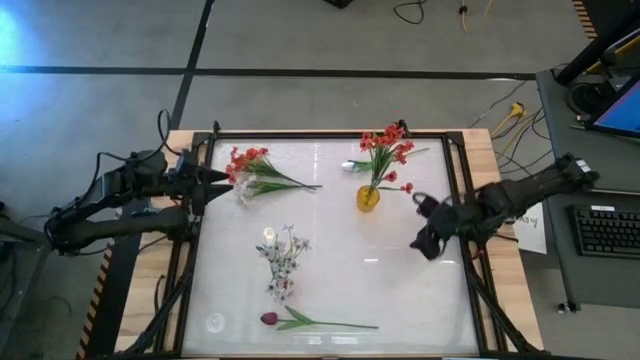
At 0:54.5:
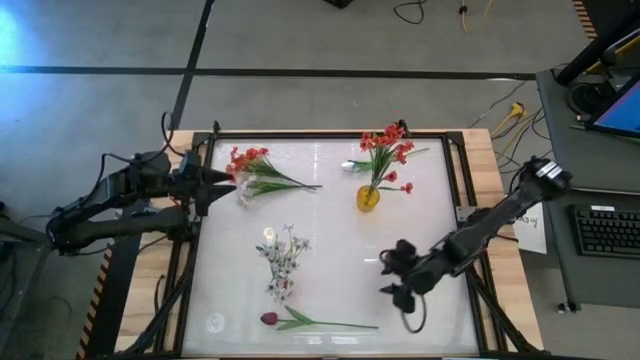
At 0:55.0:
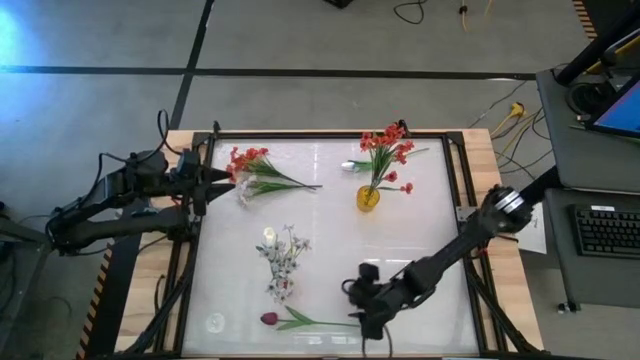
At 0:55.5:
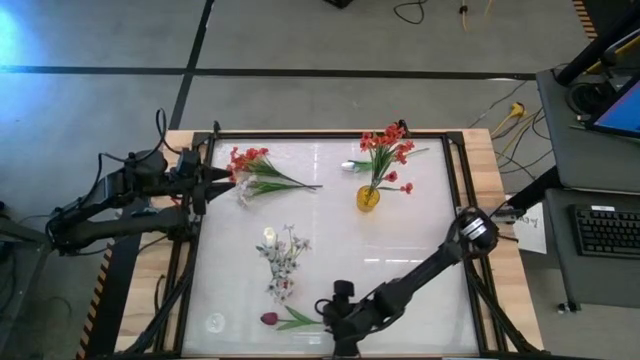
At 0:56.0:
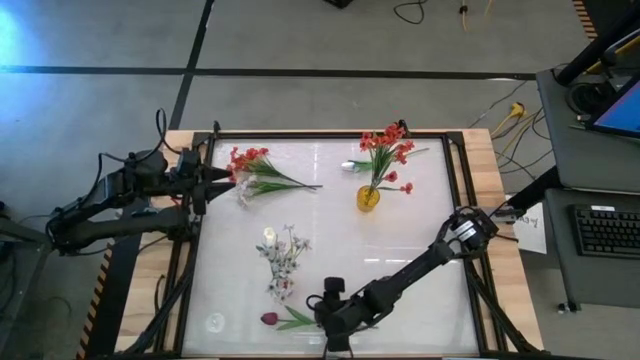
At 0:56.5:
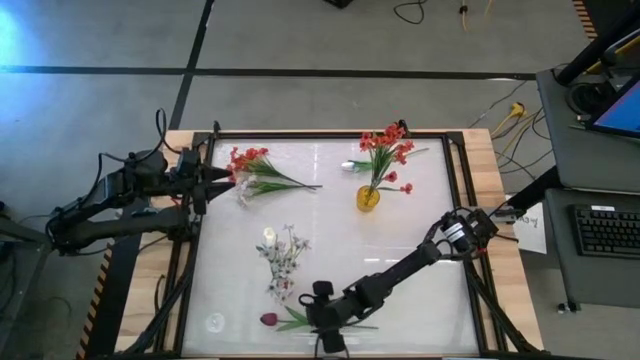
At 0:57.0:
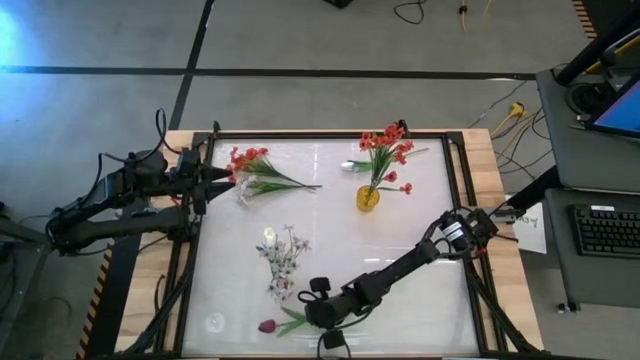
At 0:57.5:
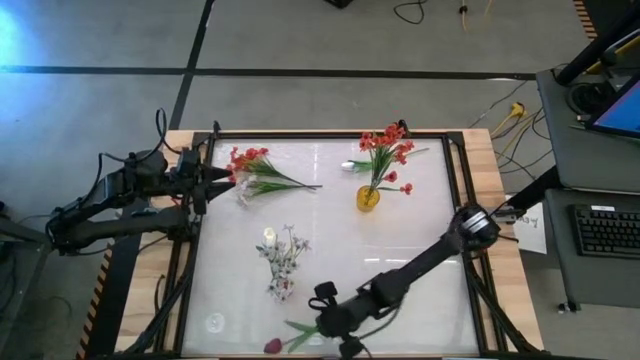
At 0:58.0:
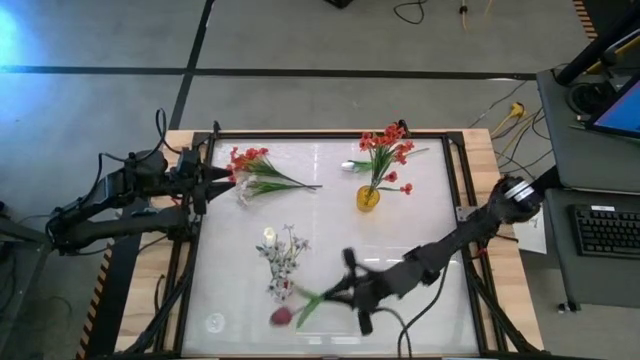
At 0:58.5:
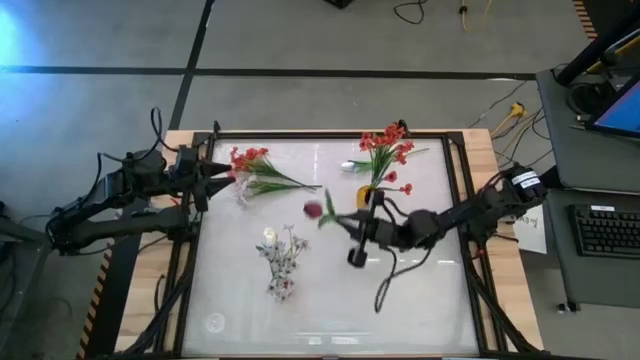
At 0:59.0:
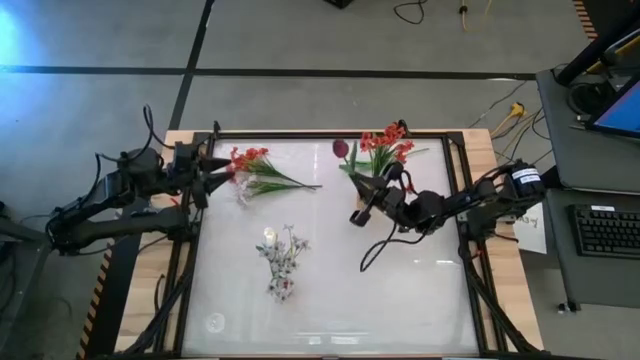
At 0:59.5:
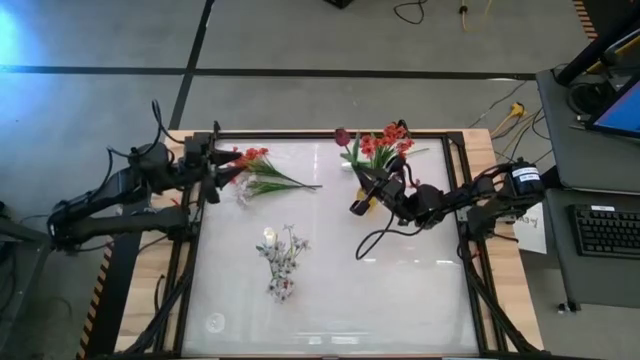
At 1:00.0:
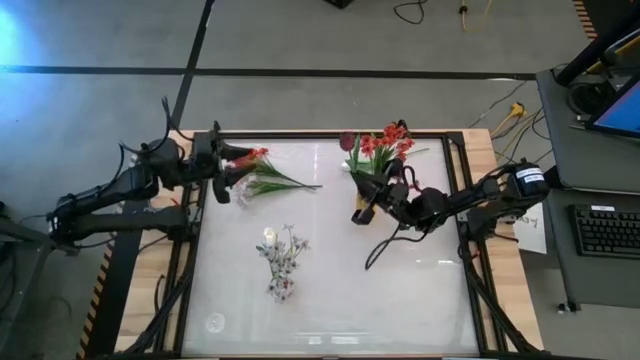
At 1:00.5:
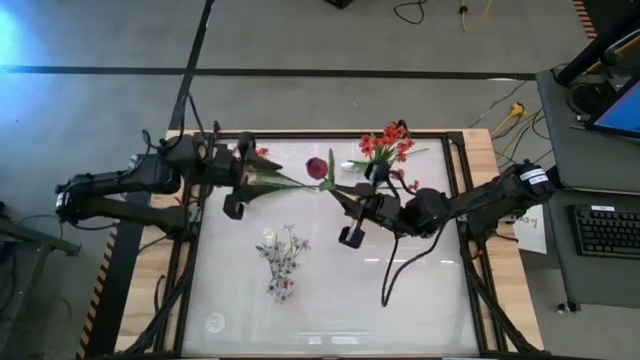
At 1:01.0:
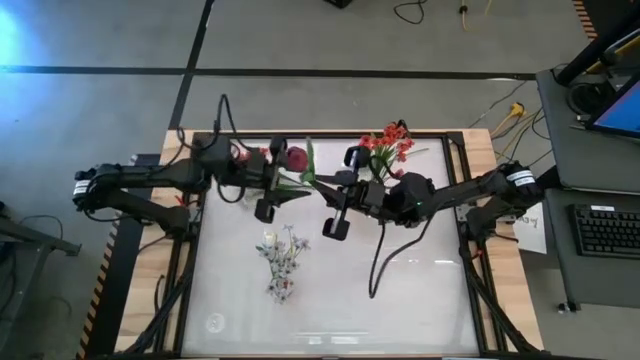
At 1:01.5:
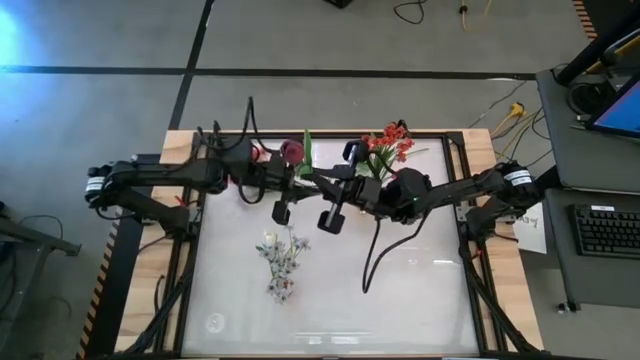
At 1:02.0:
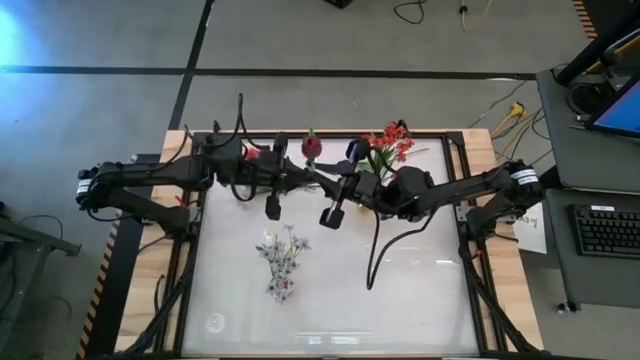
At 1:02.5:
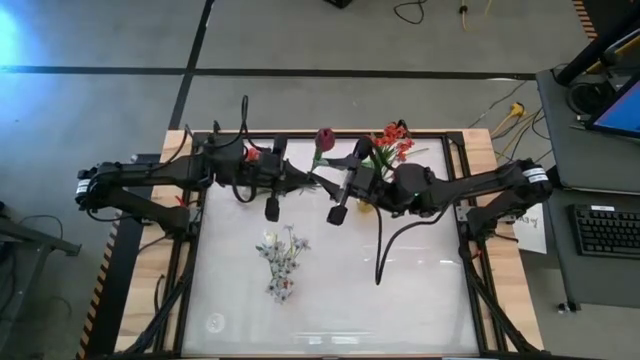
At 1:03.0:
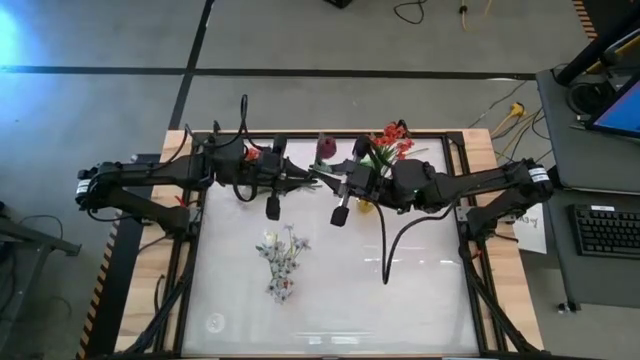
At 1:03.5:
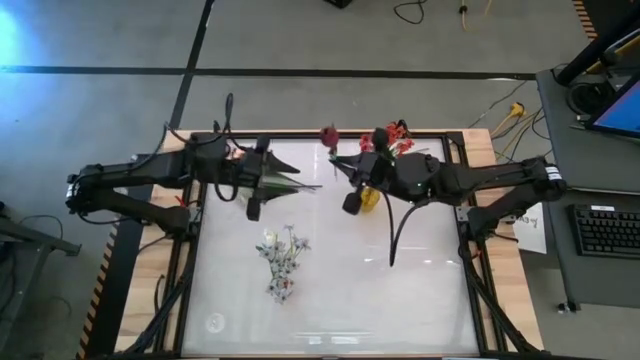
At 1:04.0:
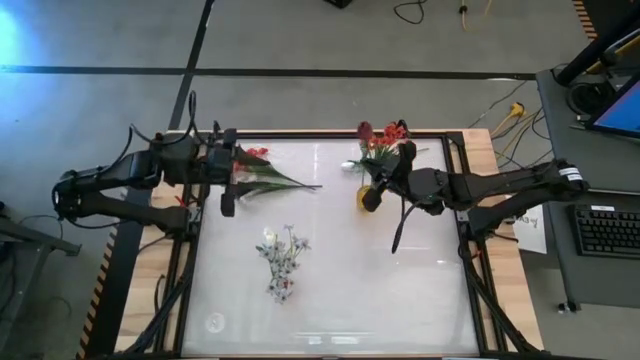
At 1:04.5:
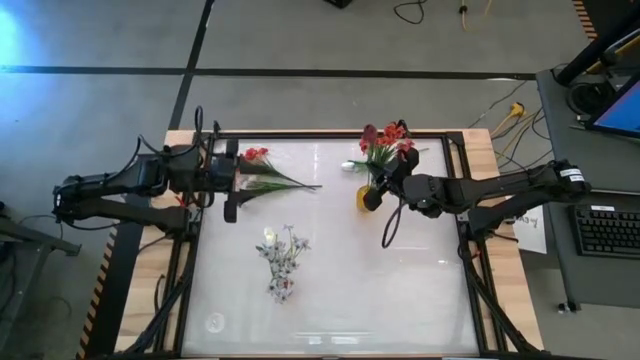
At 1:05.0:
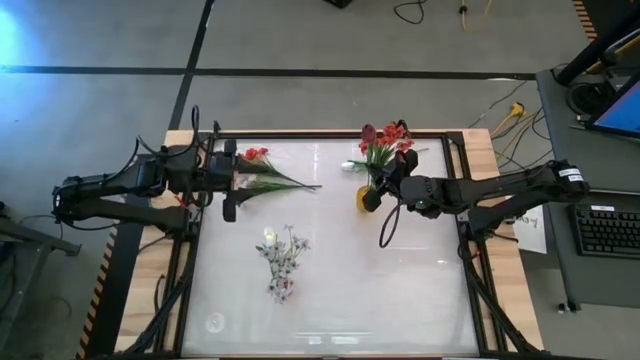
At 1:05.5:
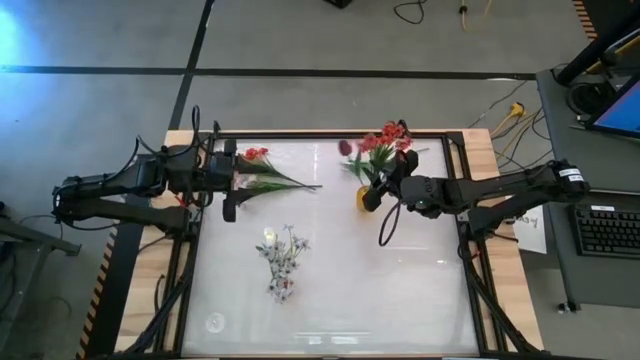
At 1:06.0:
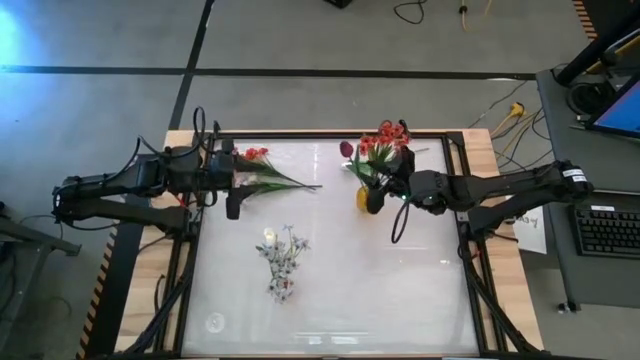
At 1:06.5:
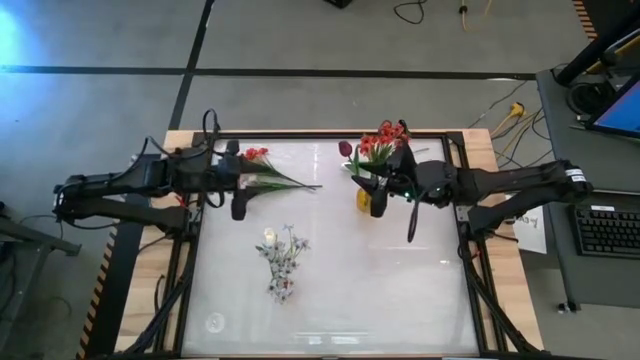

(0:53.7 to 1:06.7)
Task: Sort flowers into vase by color
Put the red flower into the yellow vase

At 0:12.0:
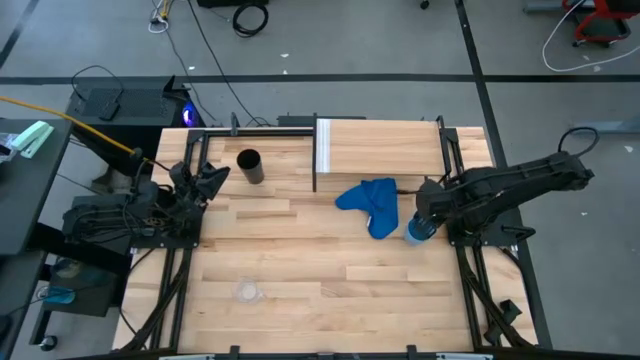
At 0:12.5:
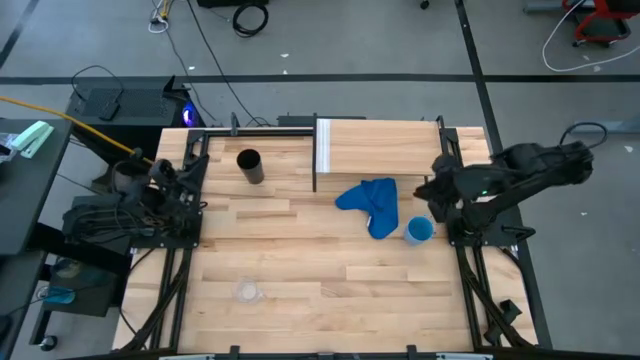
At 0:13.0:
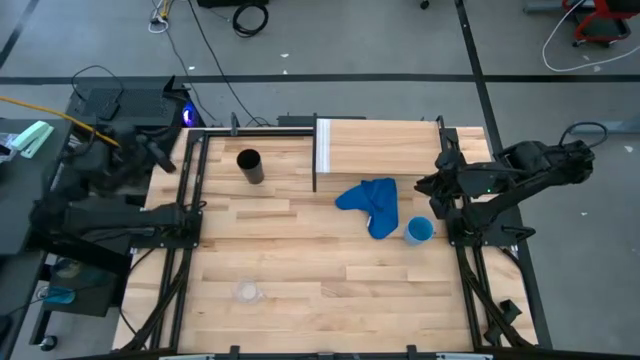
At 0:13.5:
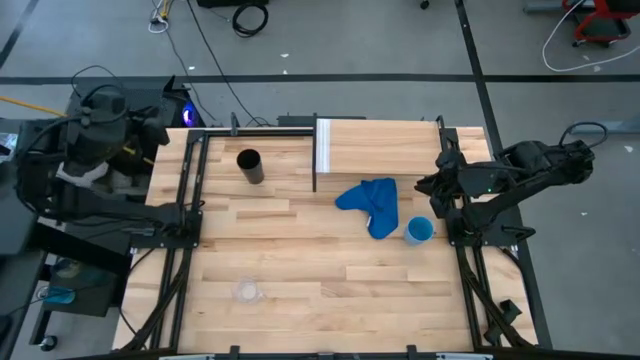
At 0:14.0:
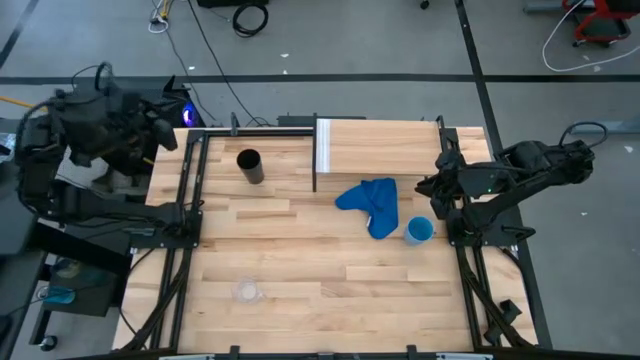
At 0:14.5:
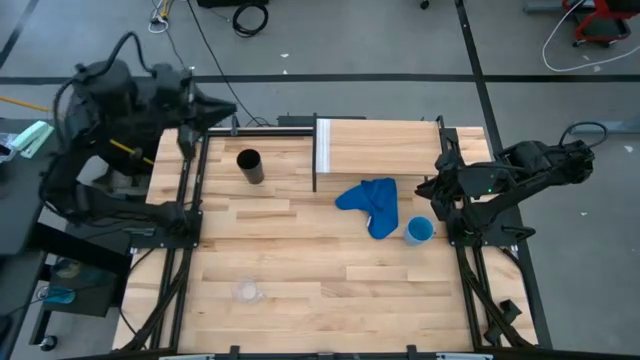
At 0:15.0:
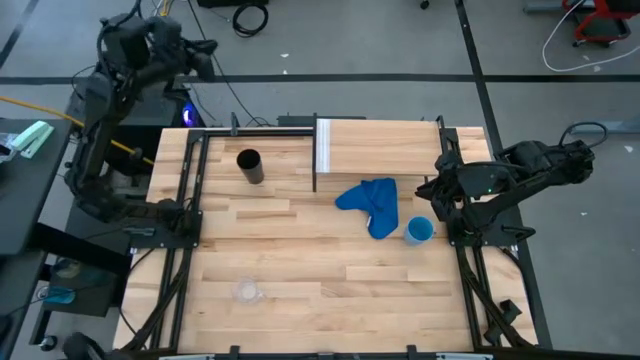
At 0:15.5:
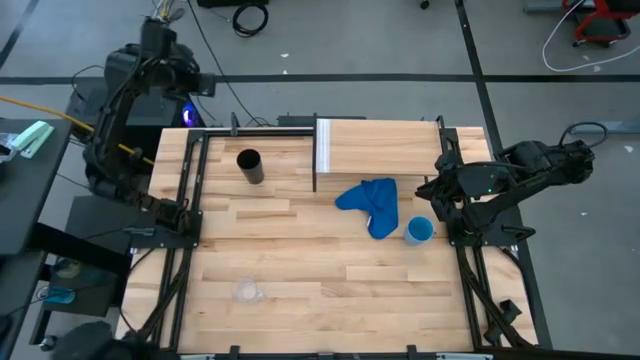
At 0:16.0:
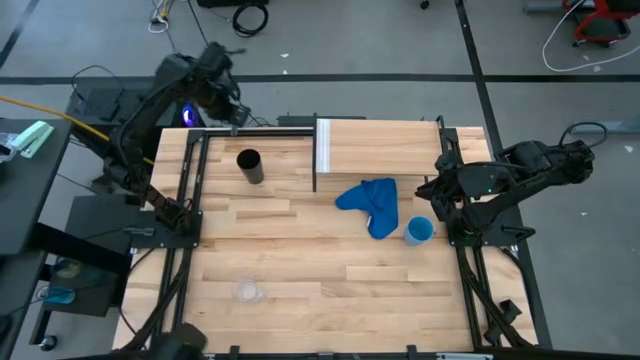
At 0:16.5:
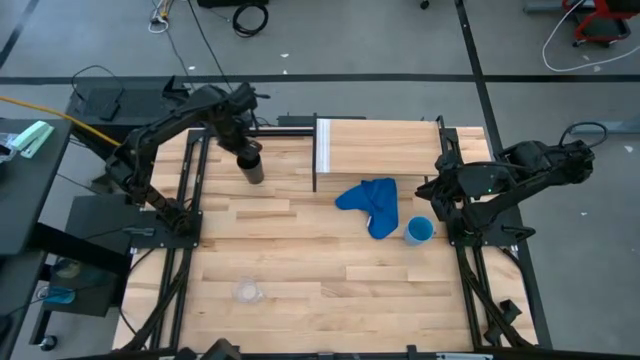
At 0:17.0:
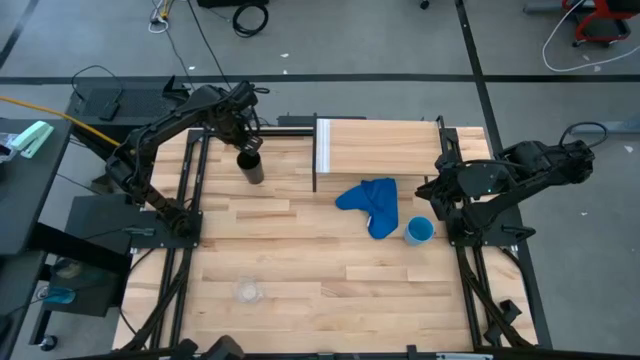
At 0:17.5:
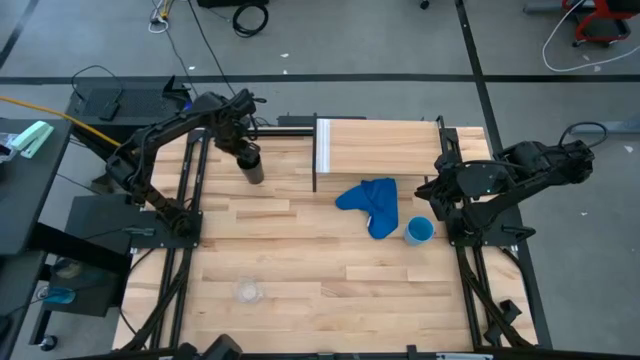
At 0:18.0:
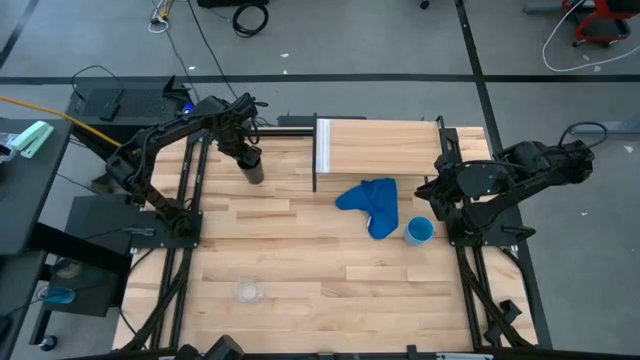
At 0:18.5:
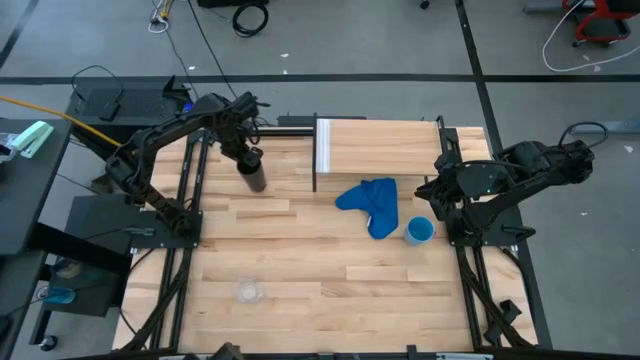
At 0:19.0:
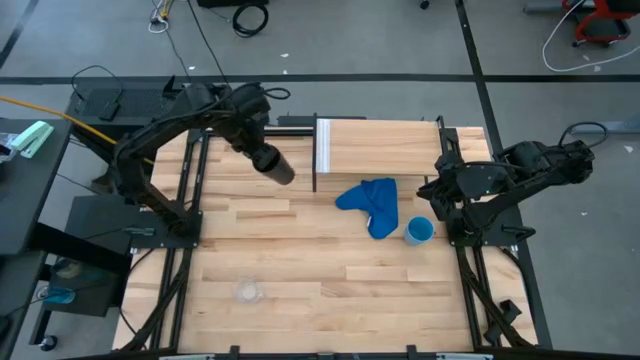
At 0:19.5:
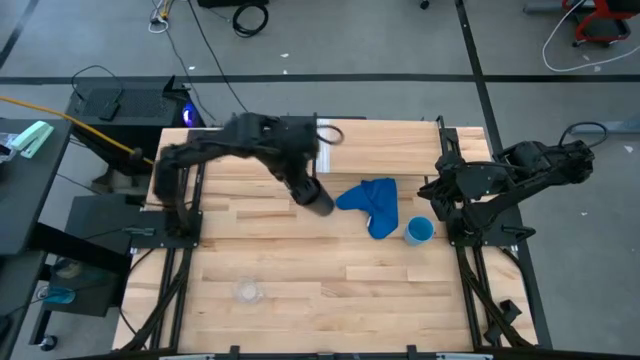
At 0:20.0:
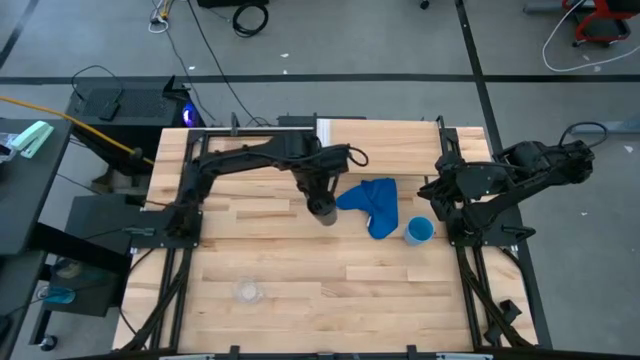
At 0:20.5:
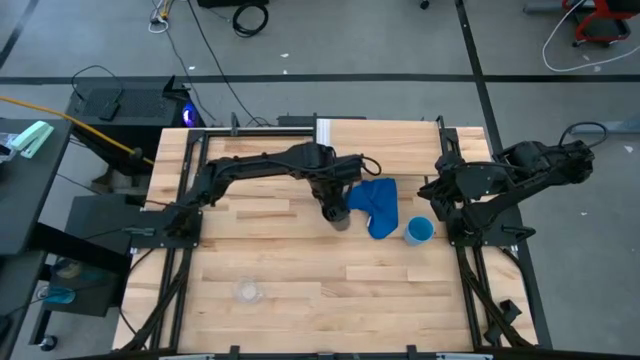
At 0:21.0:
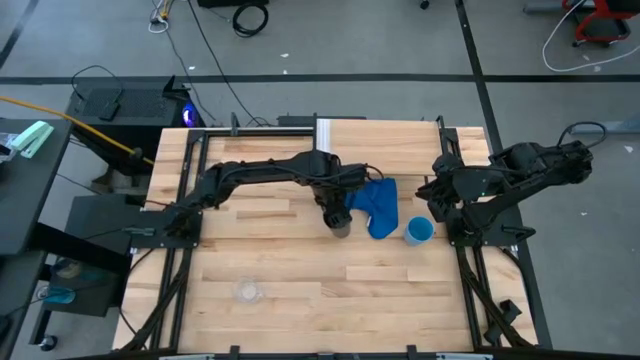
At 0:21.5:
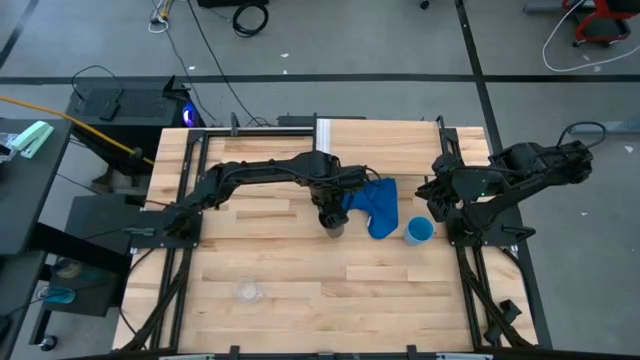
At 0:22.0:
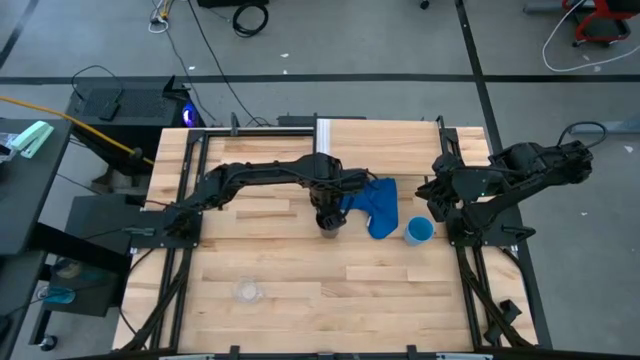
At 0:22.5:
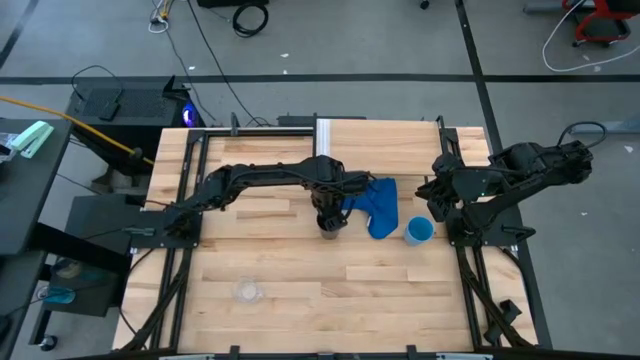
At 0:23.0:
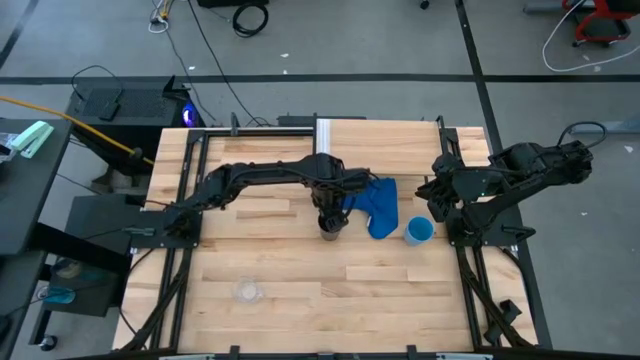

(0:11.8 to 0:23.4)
Task: Stack small to large cups/mugs on shelf
Move the black plastic cup to the top center of the table
